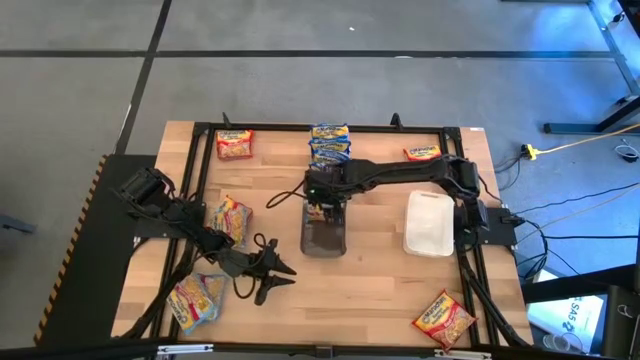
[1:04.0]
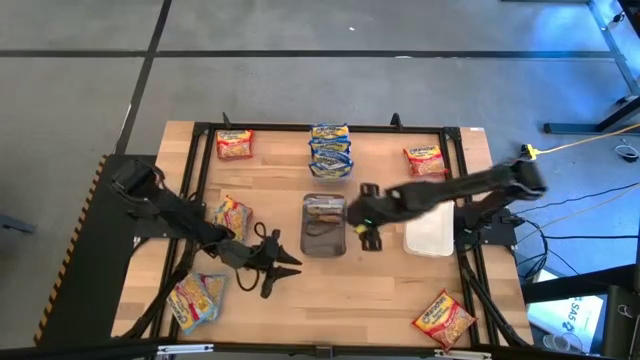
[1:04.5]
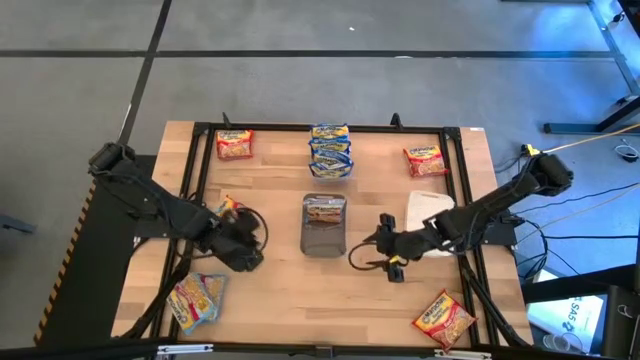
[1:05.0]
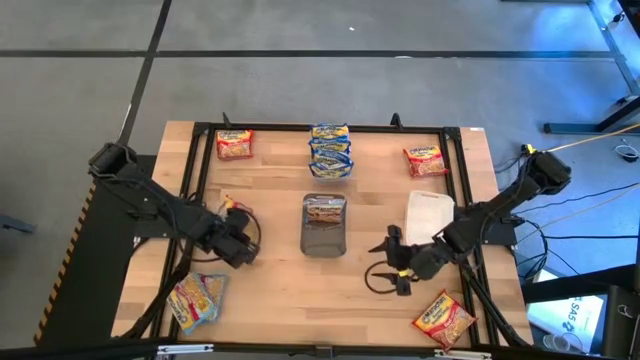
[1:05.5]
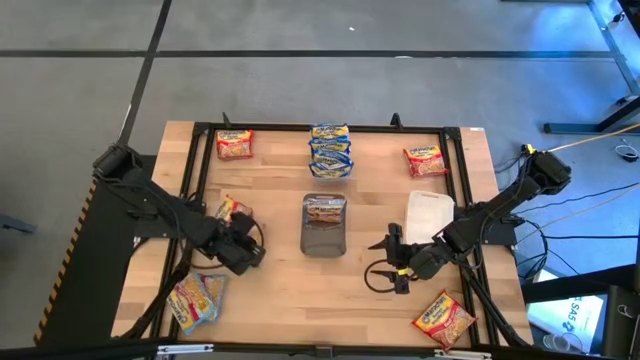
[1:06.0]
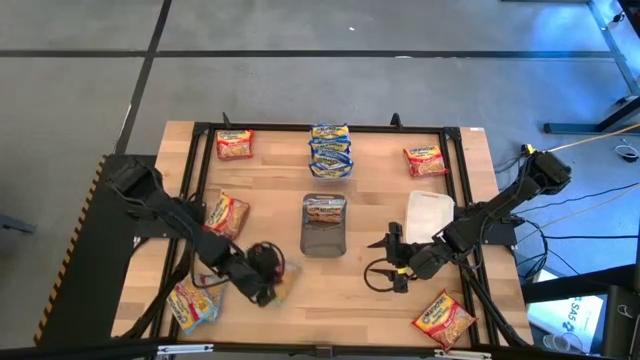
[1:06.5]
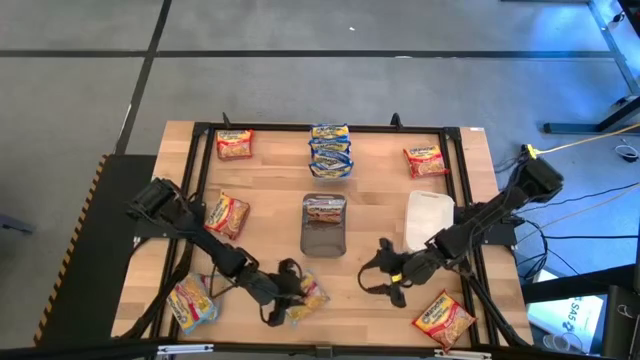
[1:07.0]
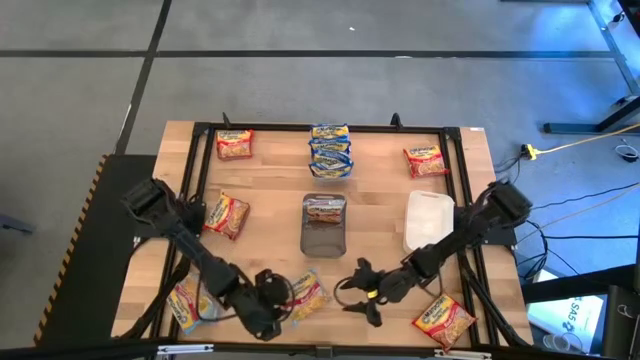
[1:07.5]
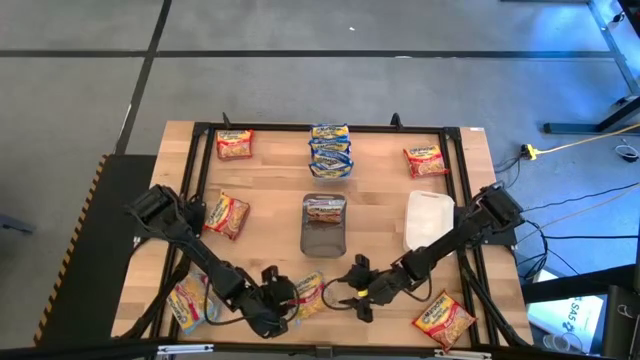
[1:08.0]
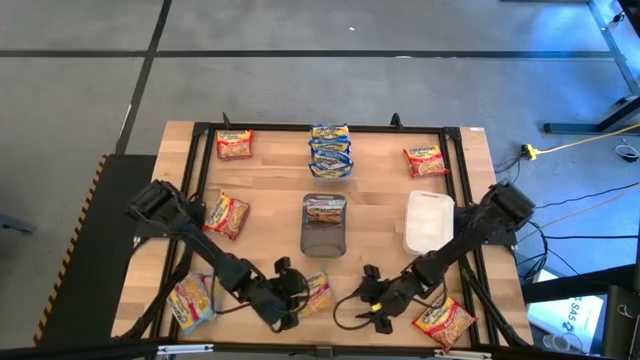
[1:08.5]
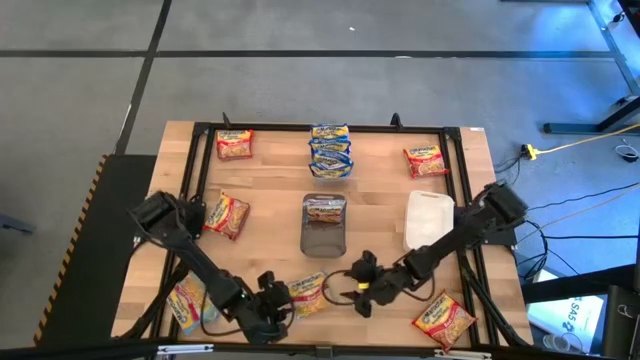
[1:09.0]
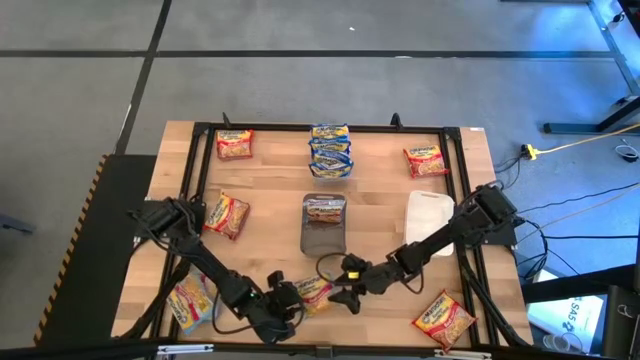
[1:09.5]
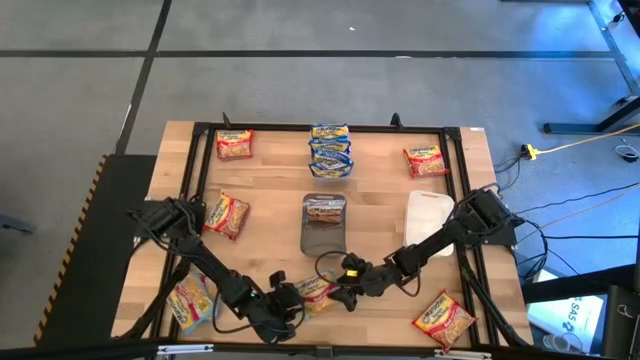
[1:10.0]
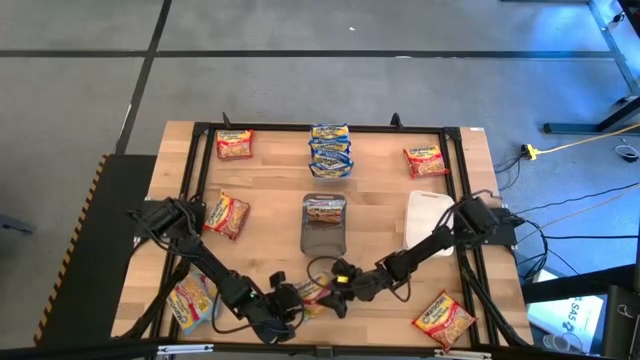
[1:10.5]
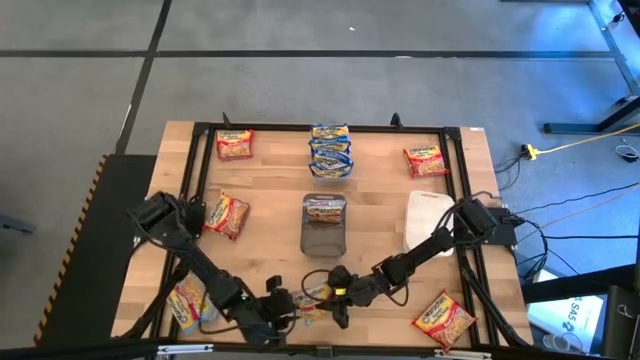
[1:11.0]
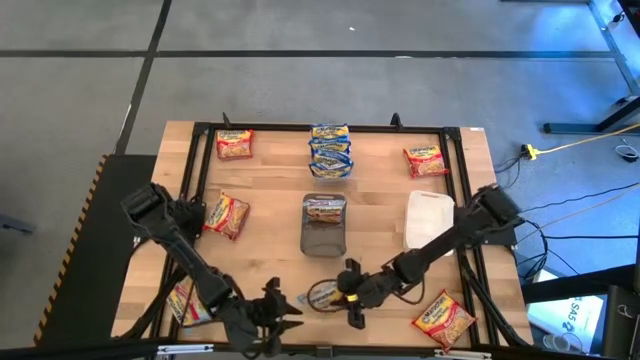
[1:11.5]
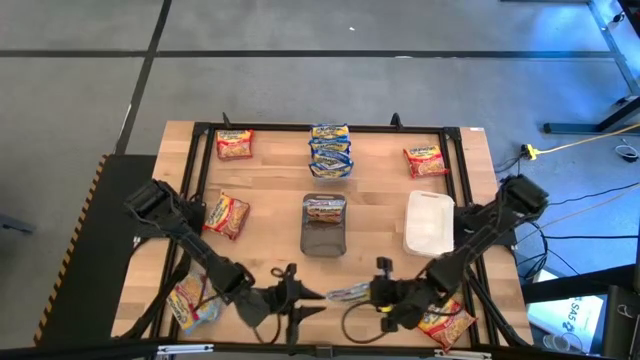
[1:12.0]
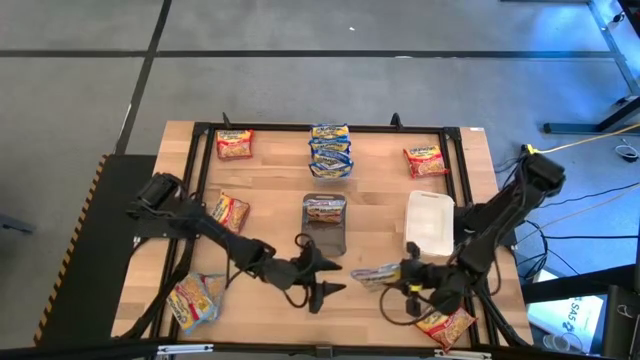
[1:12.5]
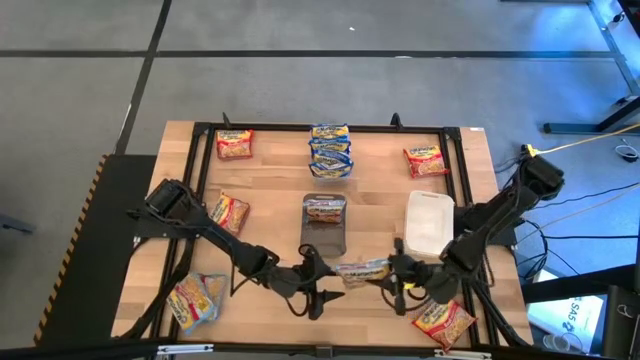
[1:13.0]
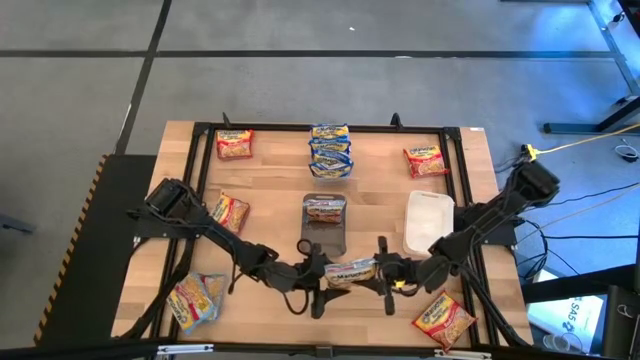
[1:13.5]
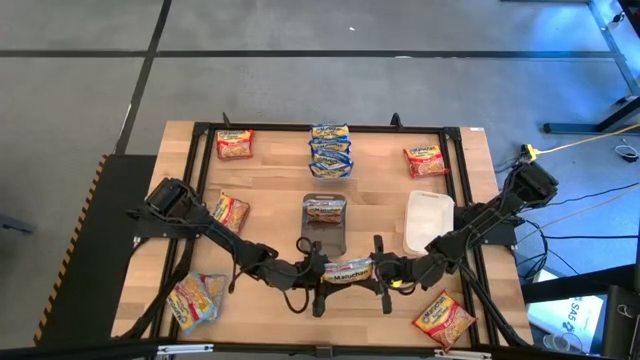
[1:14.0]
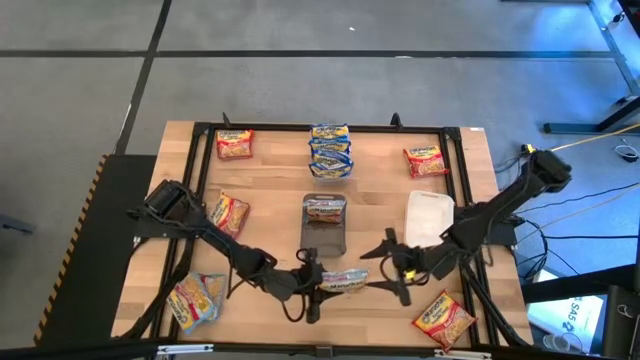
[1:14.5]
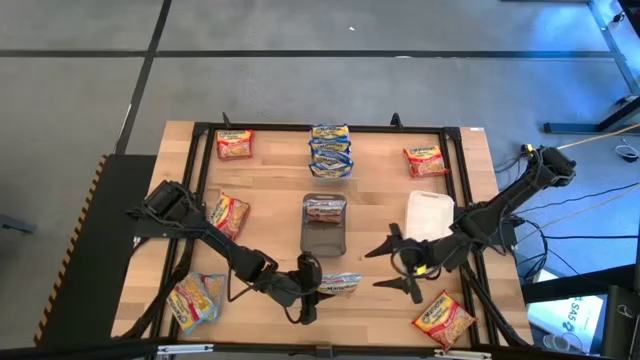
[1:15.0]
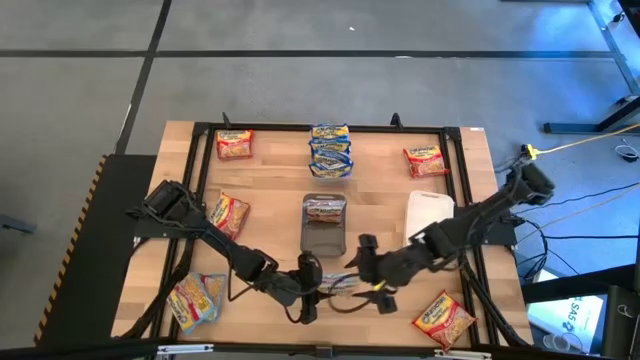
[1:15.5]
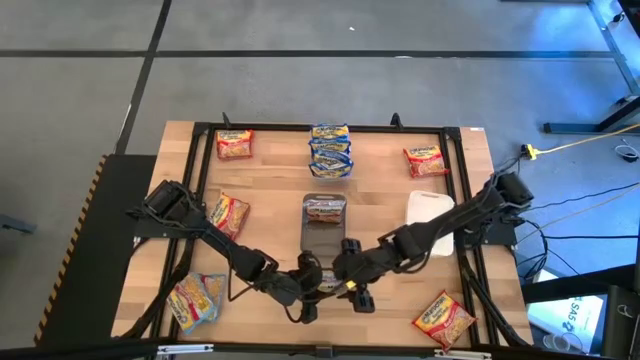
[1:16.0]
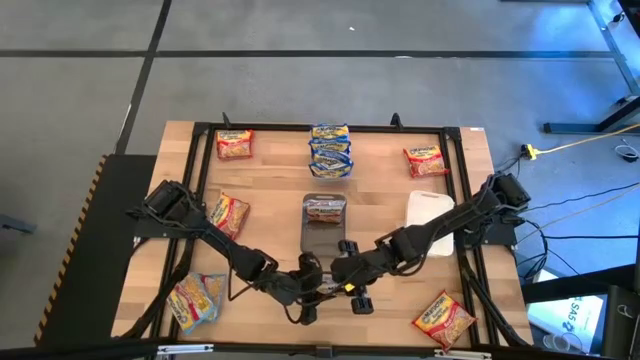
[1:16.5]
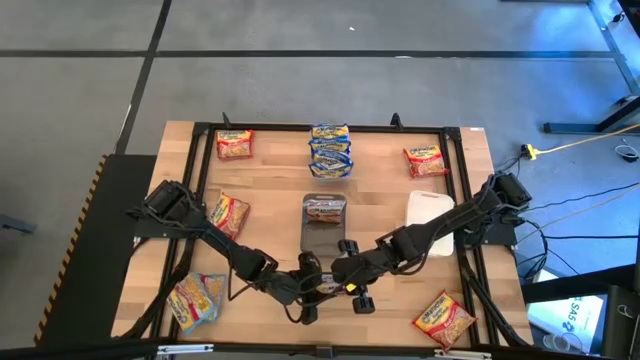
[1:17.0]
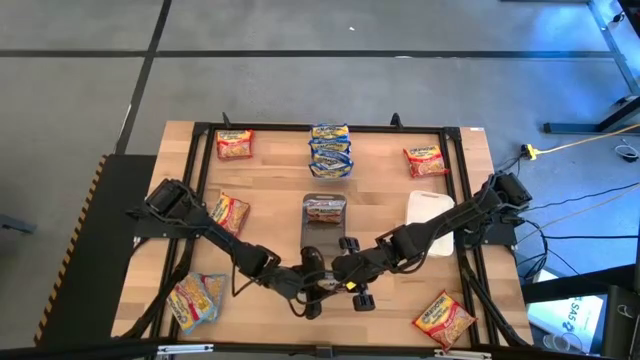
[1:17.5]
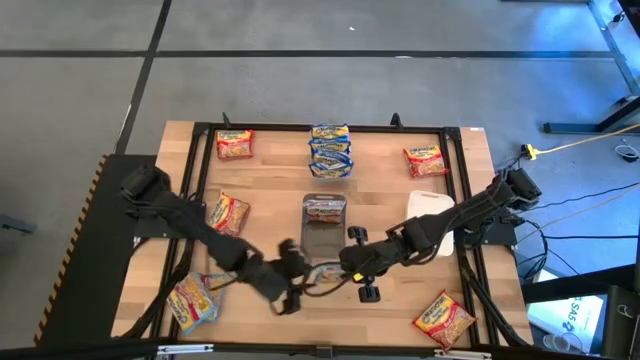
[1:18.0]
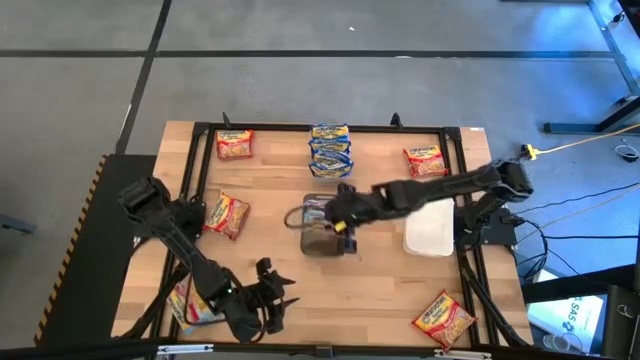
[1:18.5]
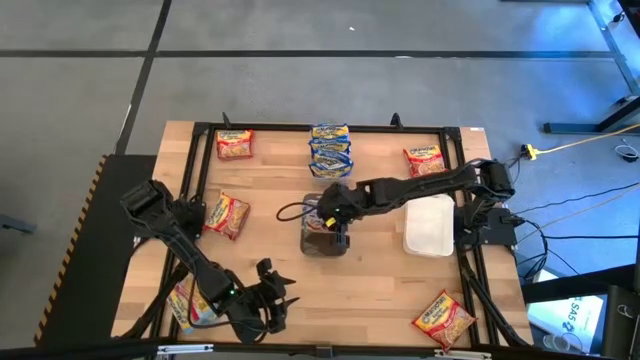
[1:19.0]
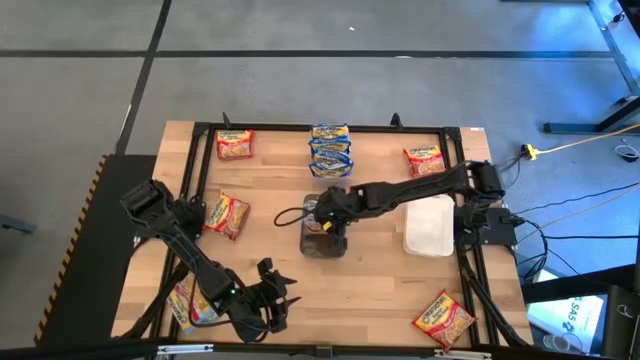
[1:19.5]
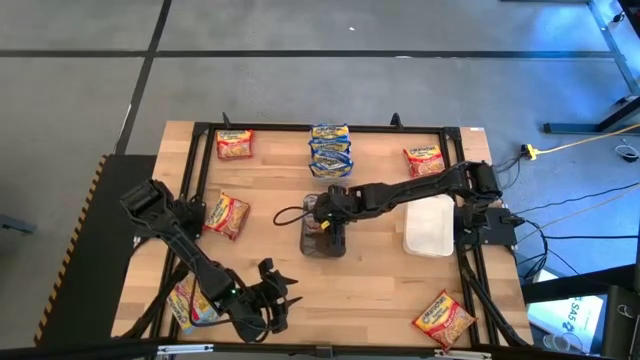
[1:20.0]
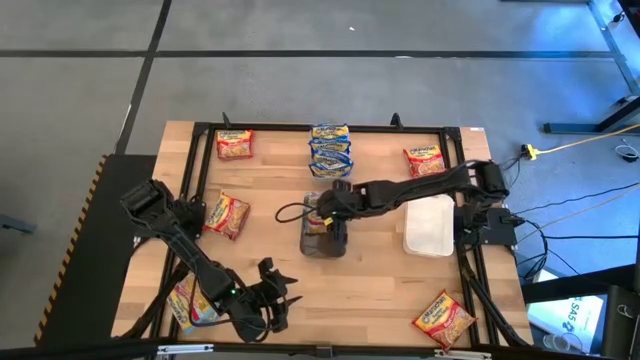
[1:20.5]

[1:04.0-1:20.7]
Task: Sort Maruchan noodles
Put the light blue noodle pack into the black bin

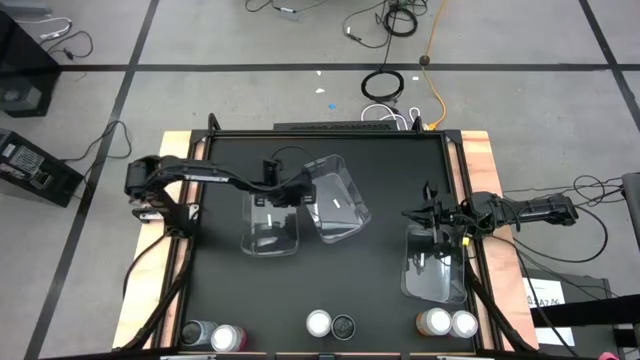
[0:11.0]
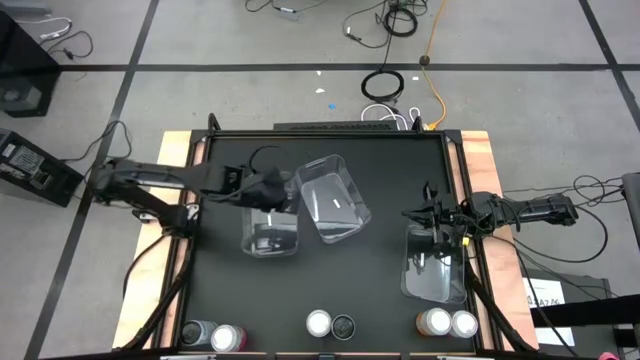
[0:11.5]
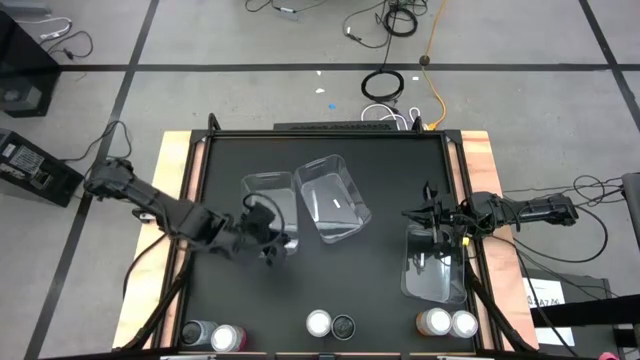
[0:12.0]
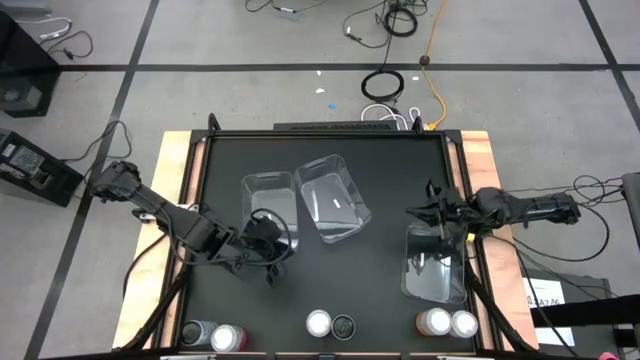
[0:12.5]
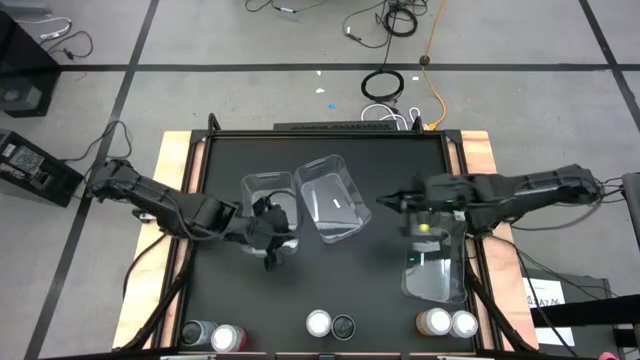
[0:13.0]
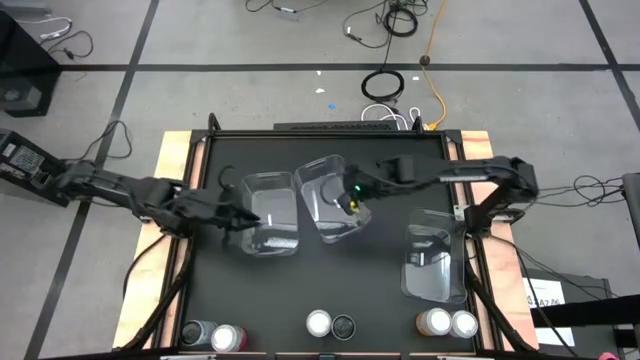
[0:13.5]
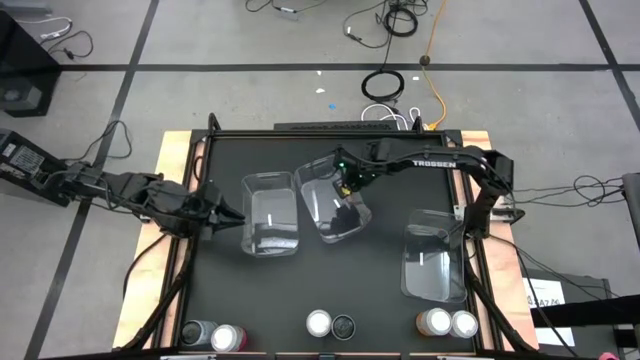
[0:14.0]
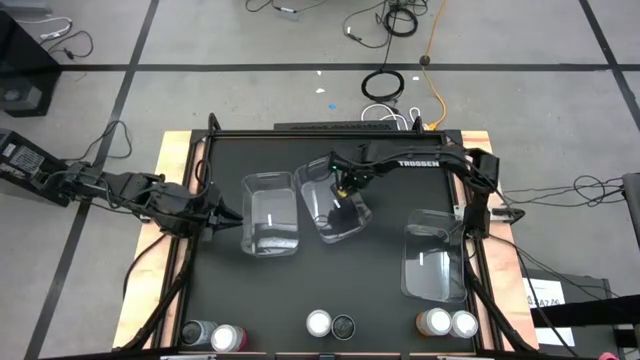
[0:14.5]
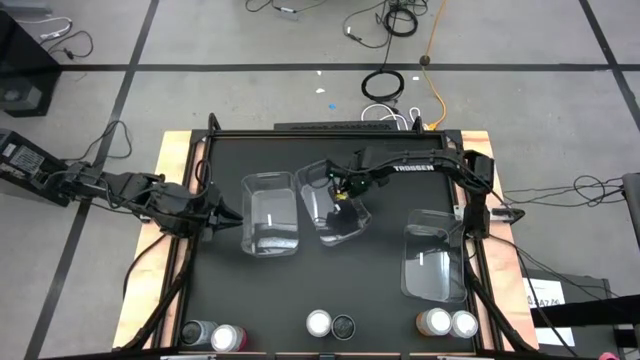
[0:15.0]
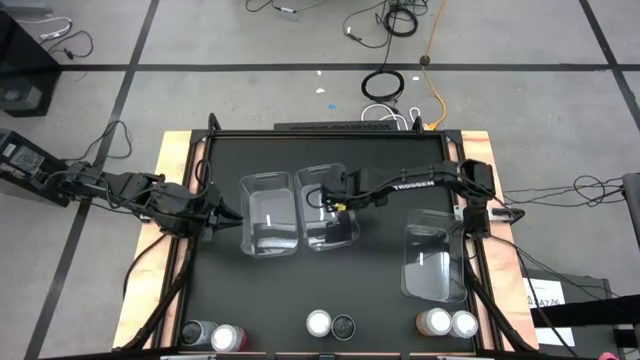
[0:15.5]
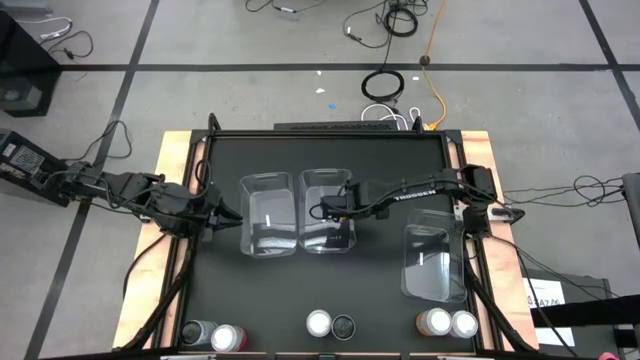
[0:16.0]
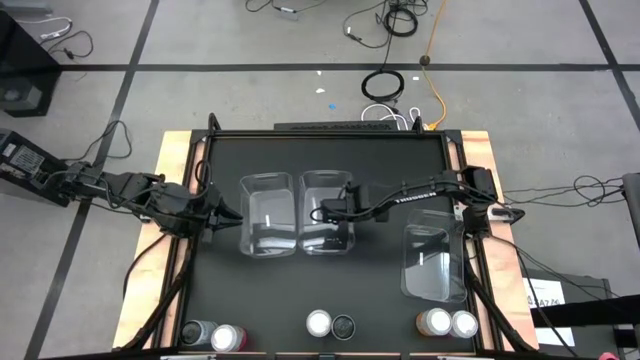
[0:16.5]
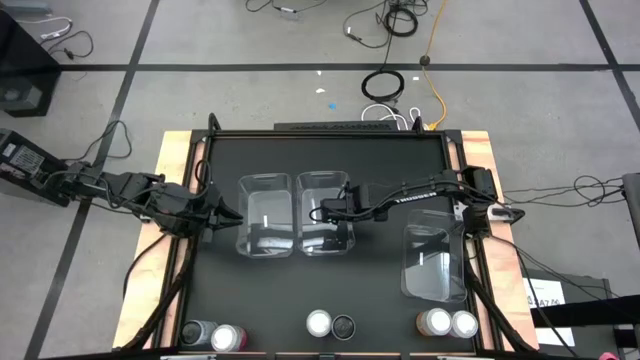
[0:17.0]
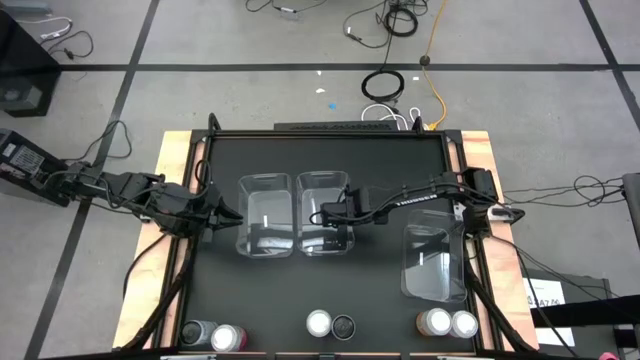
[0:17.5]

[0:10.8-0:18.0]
Task: Sort soda cans
Adjust the top right transparent bin
